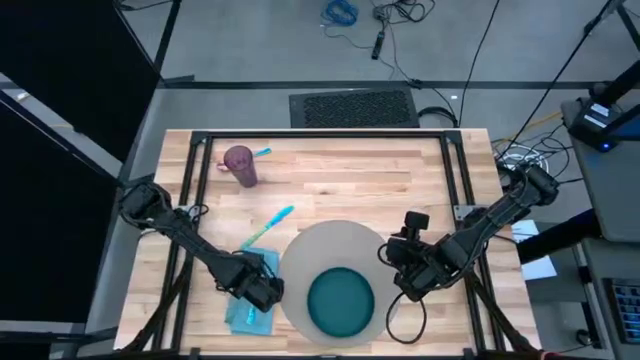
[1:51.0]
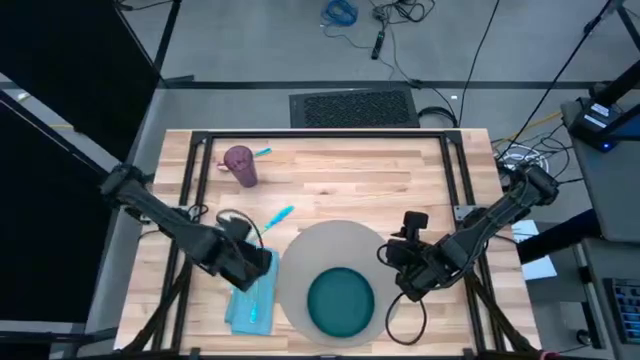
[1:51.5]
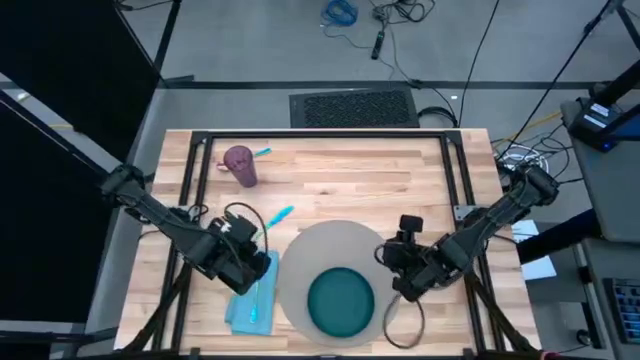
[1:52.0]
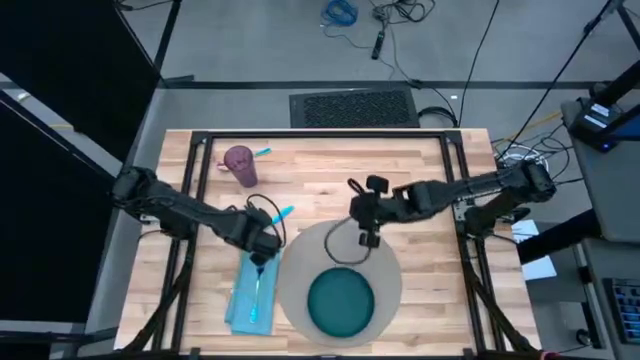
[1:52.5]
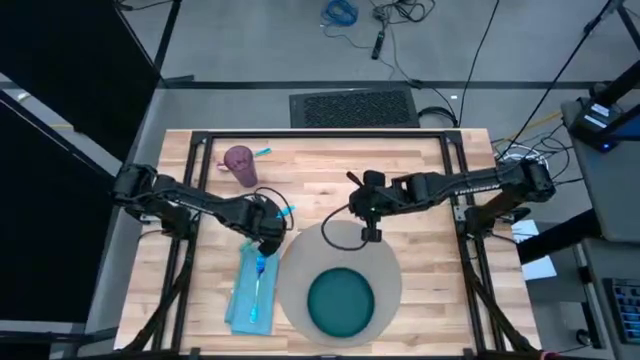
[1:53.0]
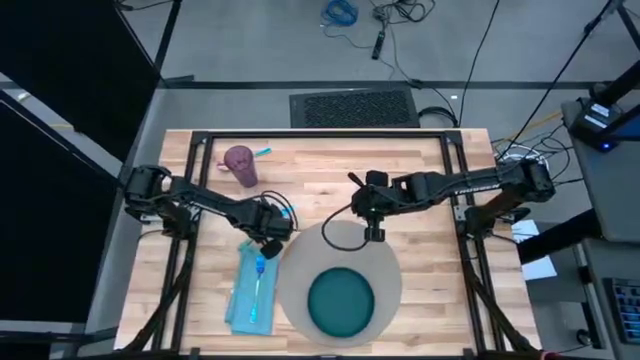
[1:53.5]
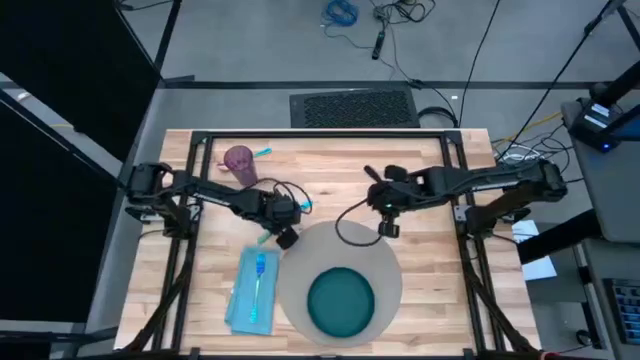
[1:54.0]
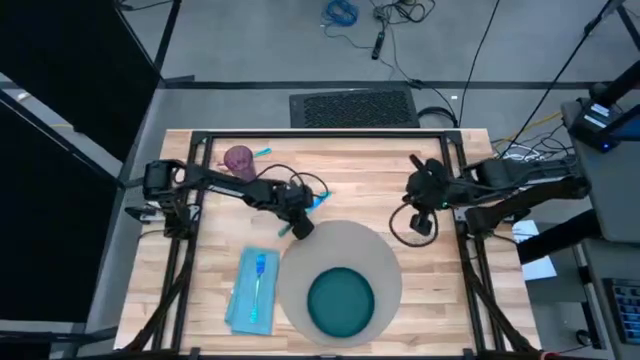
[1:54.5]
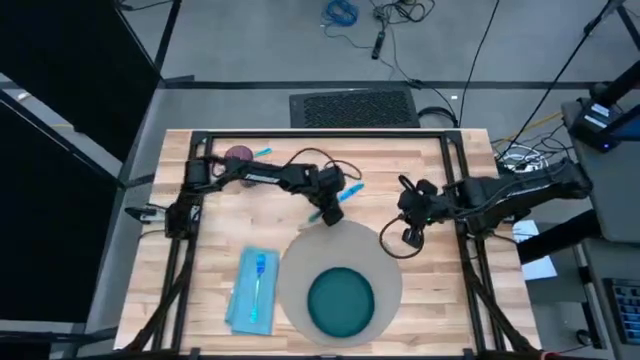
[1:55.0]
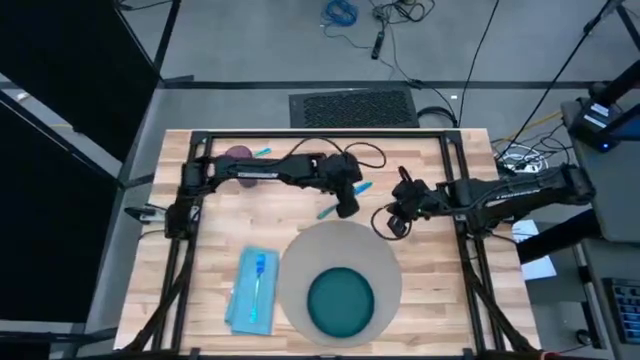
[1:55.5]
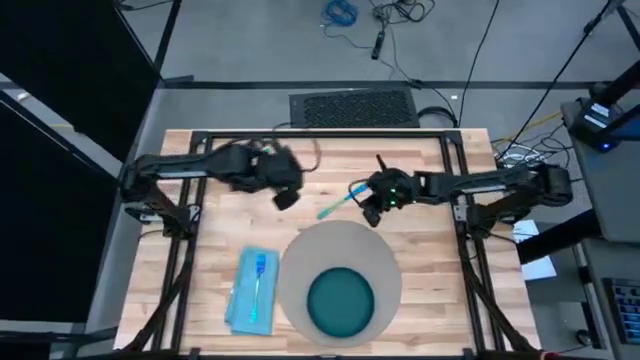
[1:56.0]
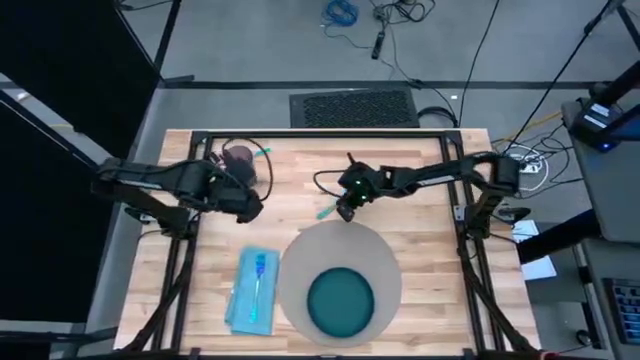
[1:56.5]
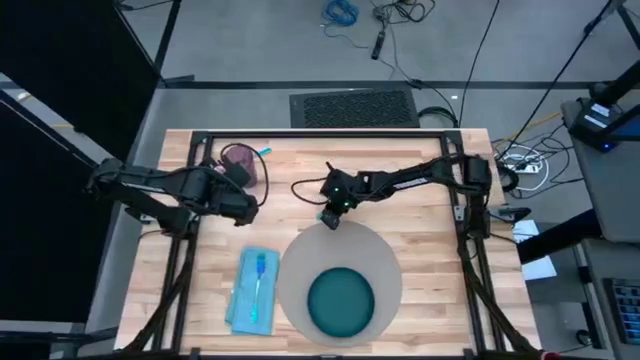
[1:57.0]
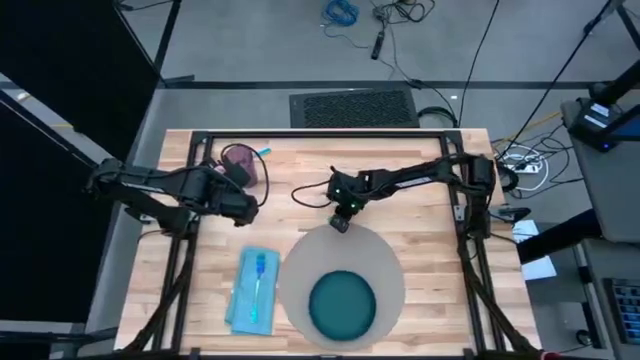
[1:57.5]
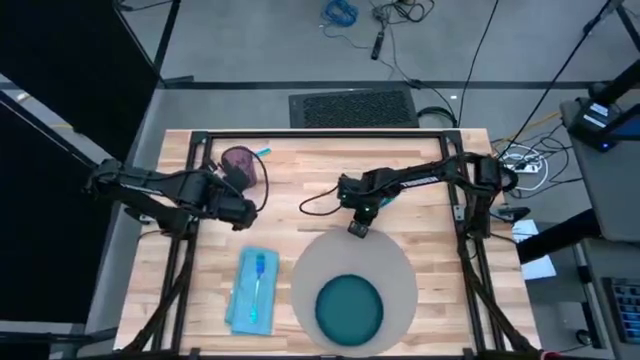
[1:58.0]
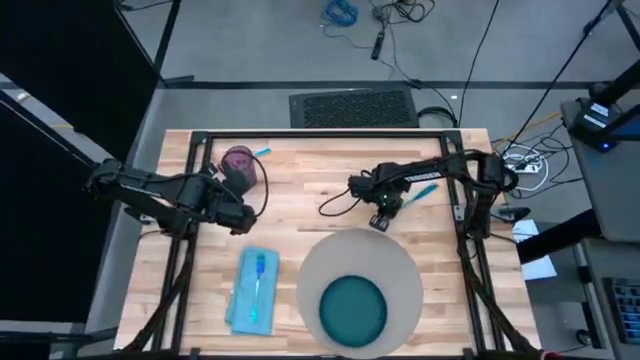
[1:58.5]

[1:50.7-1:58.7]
Task: Set table place
Move the blue knife from the top of the blue napkin

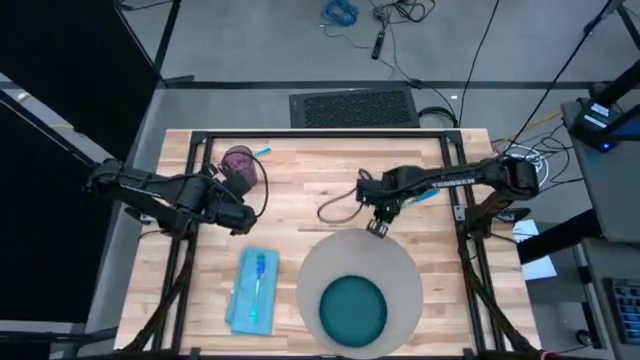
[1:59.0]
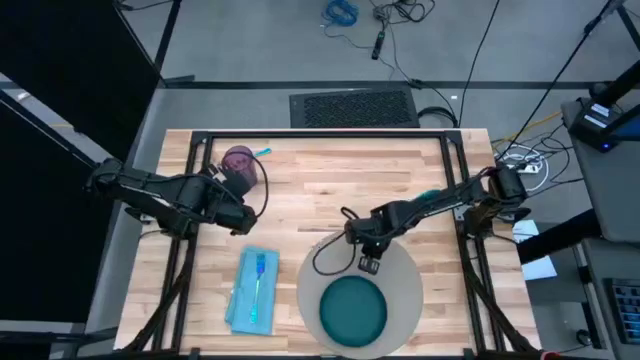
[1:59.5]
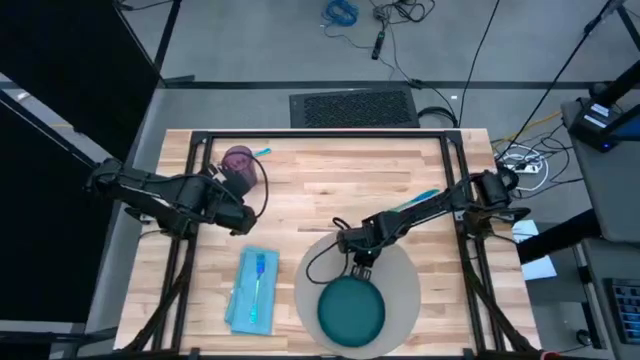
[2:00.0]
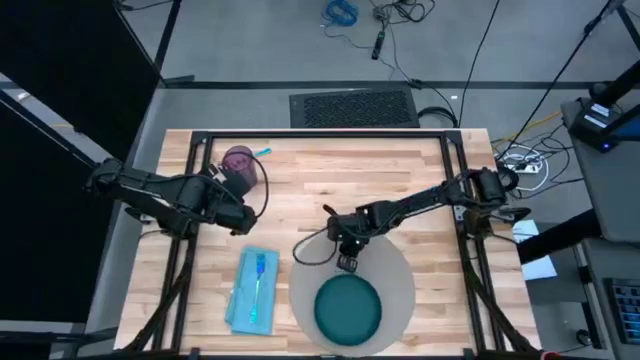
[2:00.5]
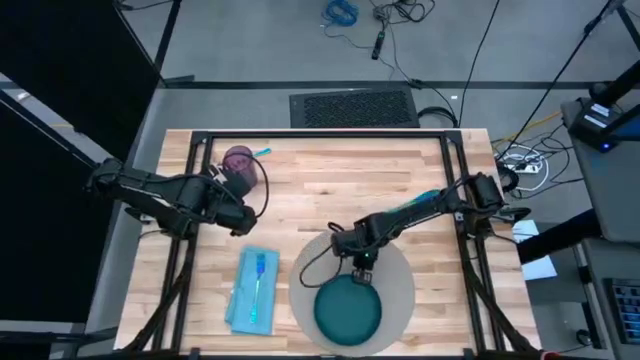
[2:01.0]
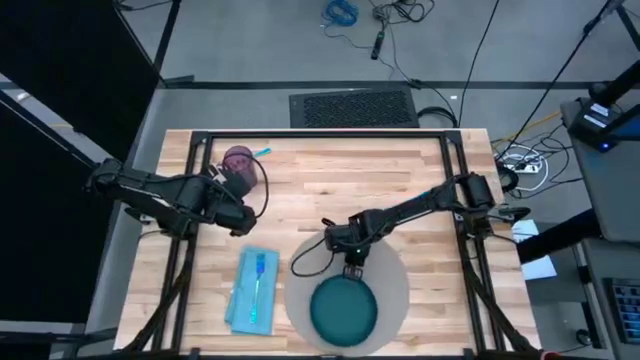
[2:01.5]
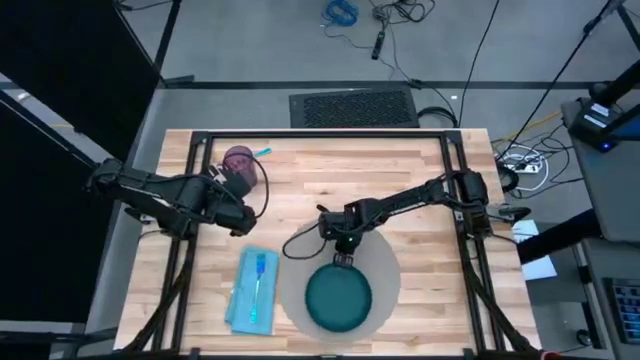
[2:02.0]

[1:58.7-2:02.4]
Adjust the gray mat on the table

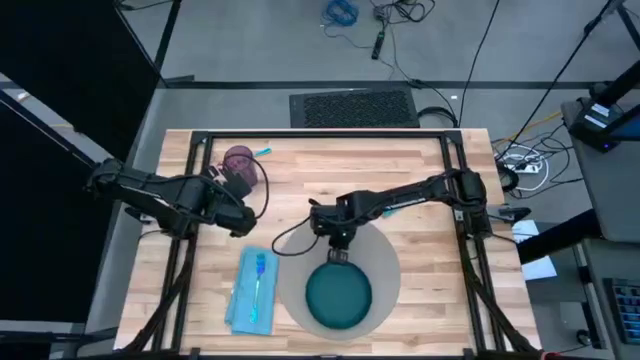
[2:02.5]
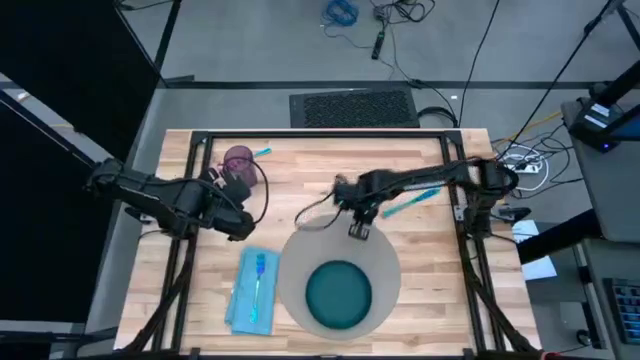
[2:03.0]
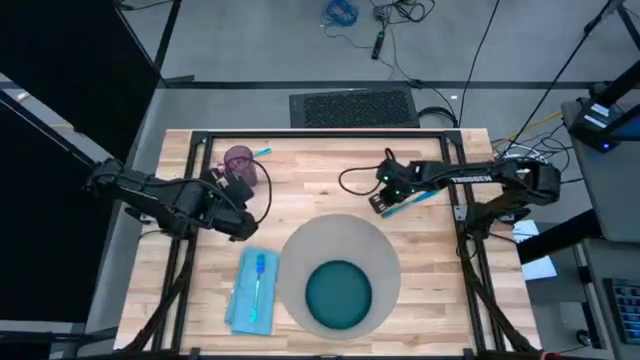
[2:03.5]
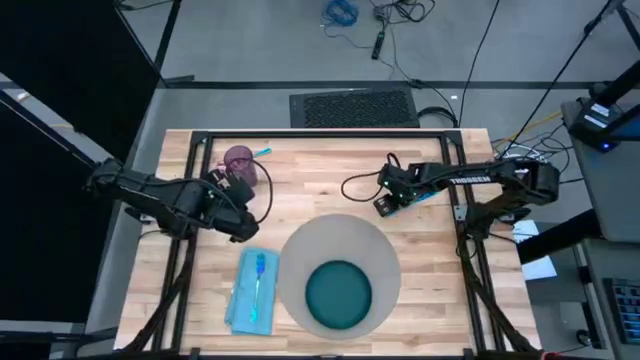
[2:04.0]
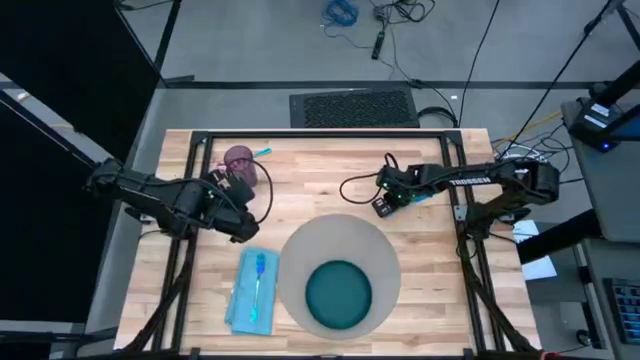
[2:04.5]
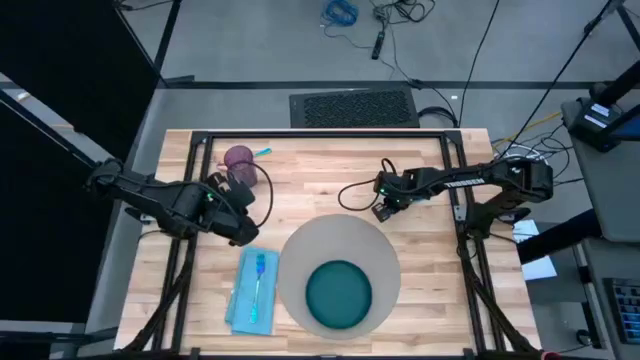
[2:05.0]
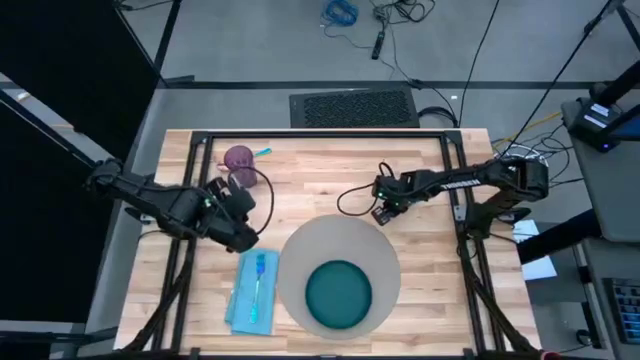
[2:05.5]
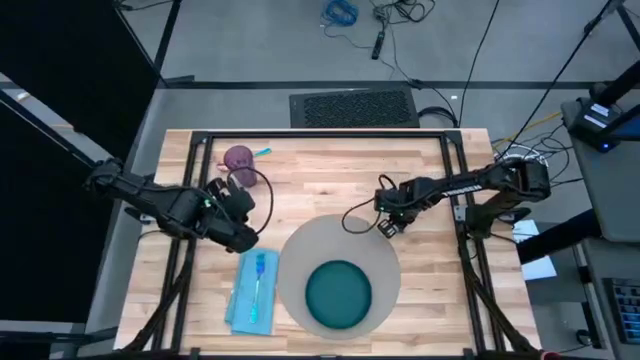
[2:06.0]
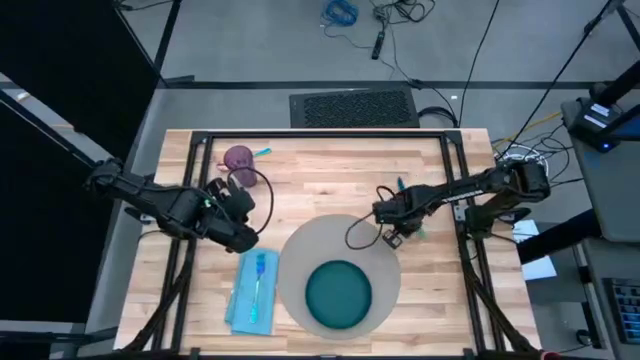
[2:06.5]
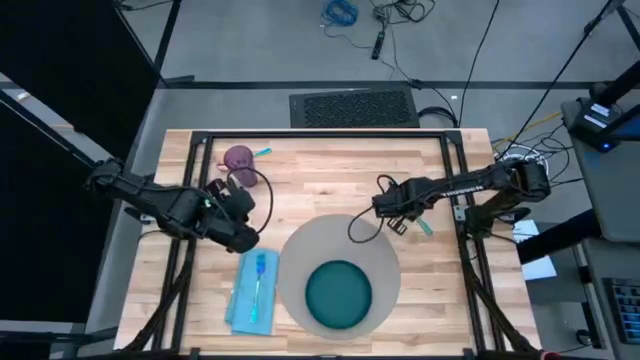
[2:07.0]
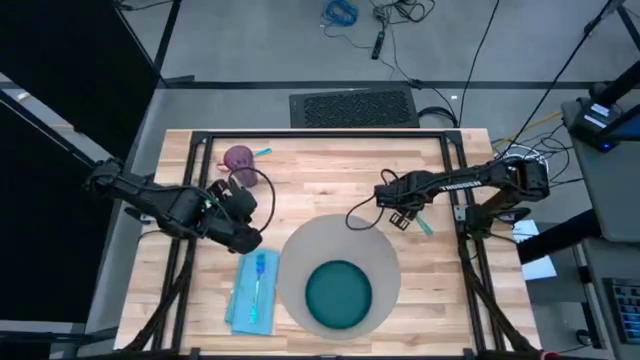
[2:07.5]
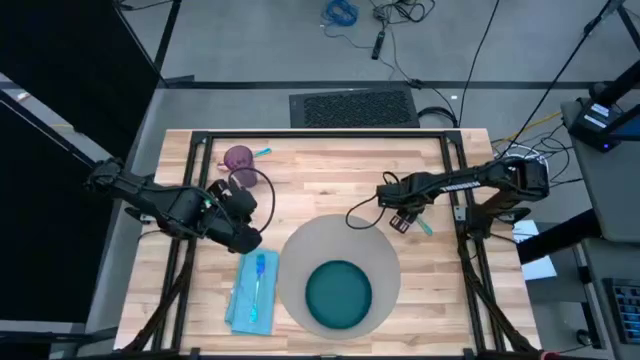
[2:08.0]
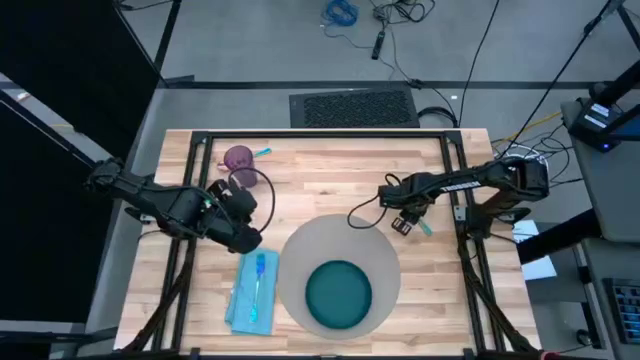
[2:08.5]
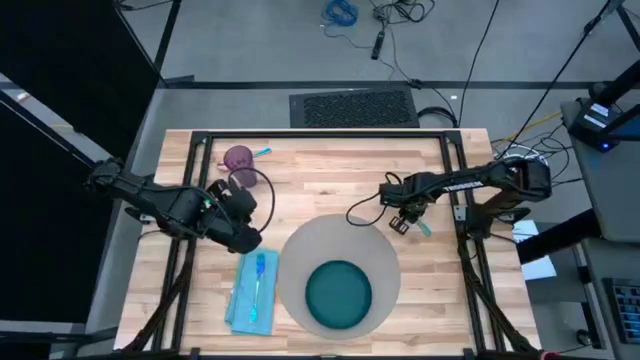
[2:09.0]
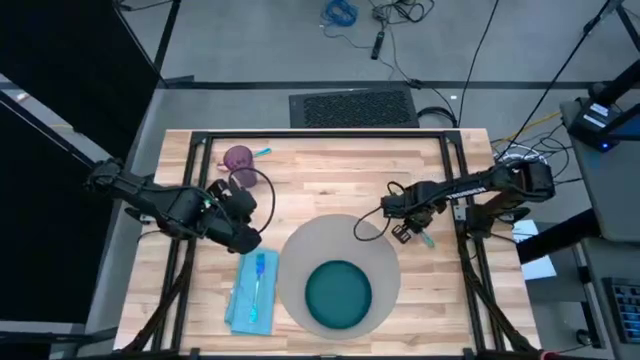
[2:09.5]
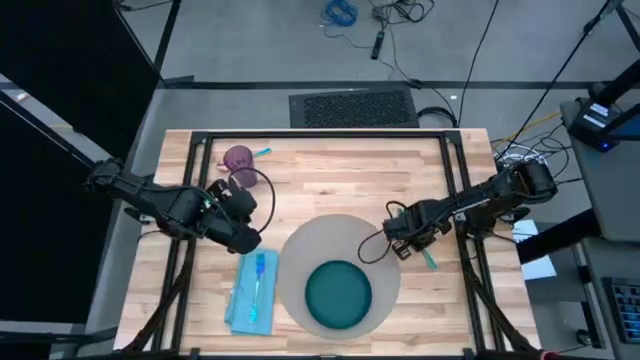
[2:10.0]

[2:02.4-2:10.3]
Move the blue knife from the top of the gray mat
